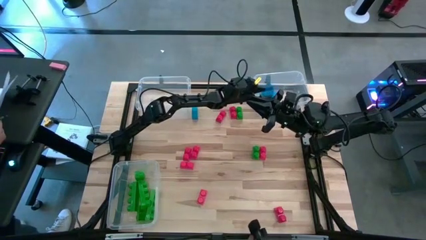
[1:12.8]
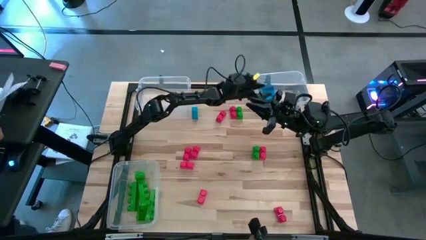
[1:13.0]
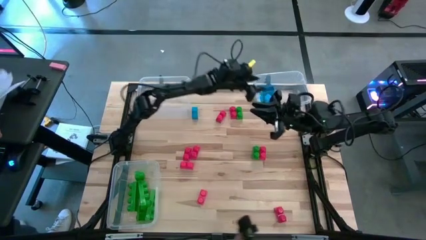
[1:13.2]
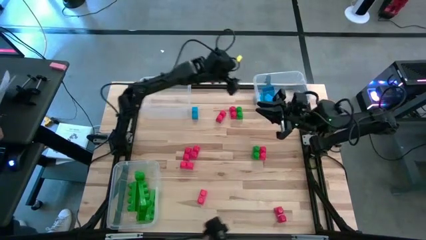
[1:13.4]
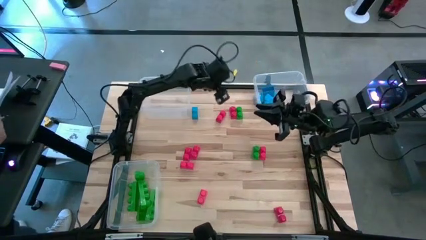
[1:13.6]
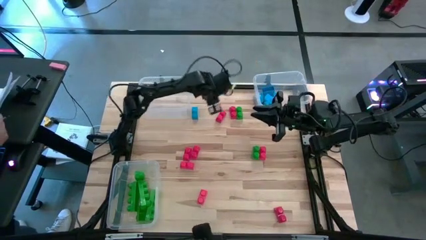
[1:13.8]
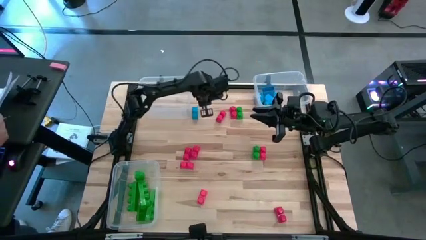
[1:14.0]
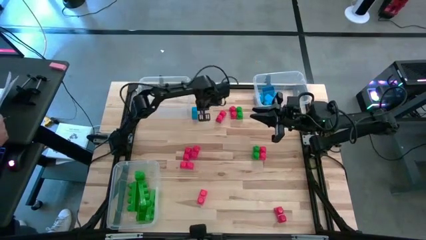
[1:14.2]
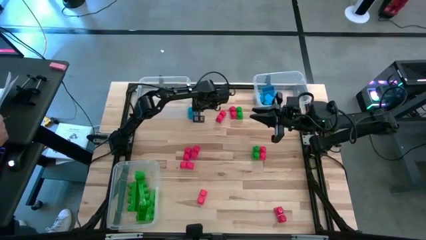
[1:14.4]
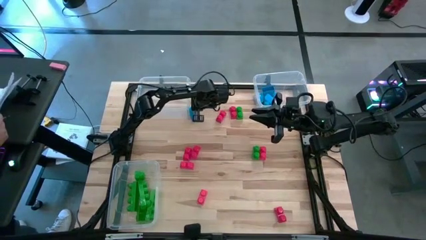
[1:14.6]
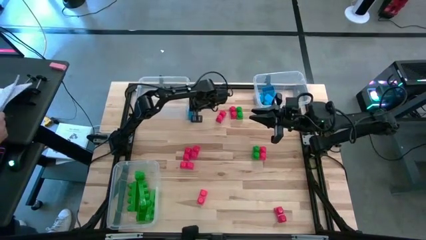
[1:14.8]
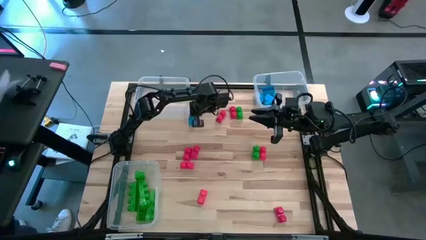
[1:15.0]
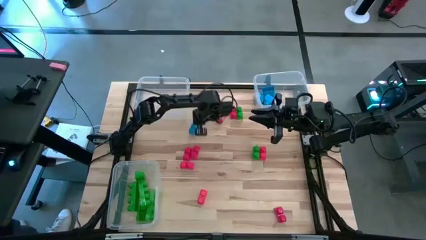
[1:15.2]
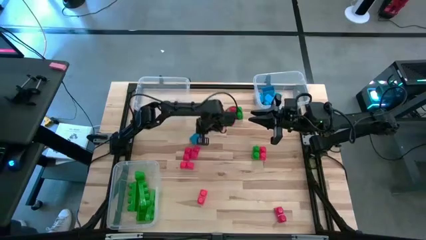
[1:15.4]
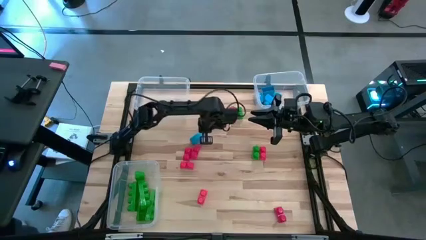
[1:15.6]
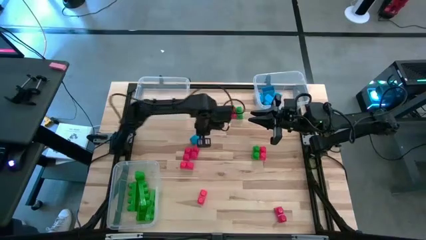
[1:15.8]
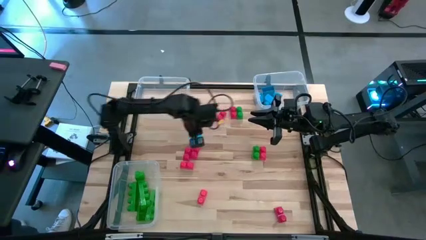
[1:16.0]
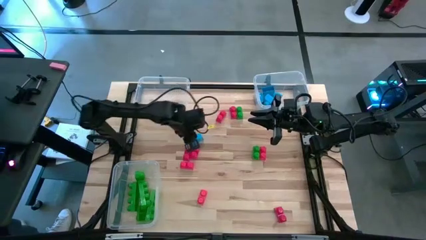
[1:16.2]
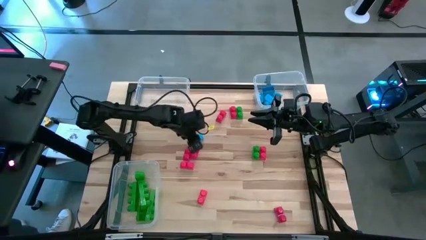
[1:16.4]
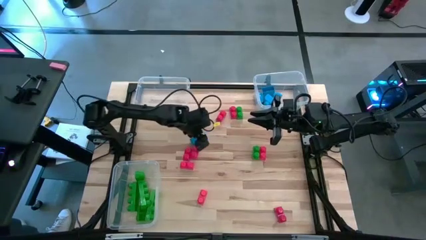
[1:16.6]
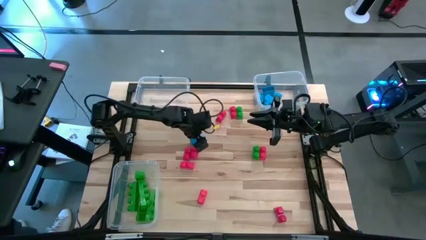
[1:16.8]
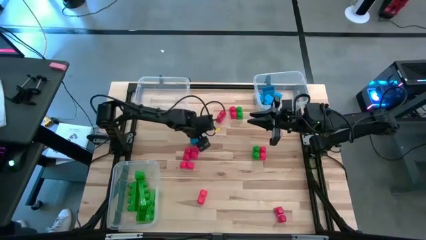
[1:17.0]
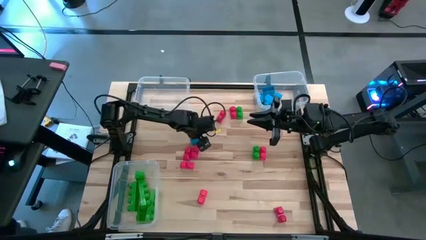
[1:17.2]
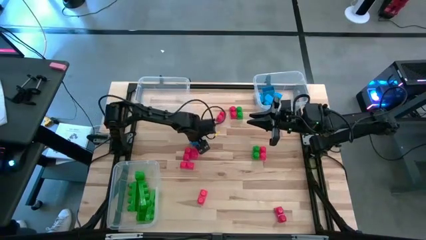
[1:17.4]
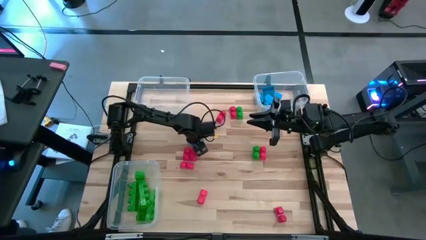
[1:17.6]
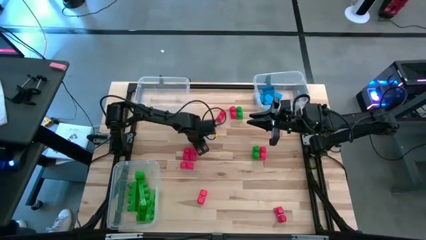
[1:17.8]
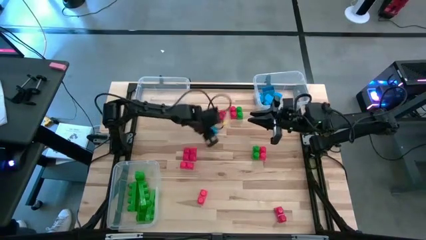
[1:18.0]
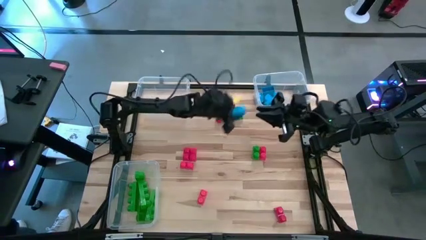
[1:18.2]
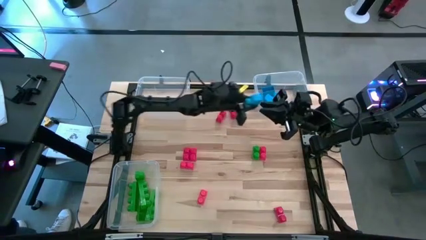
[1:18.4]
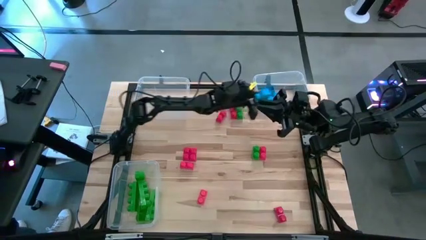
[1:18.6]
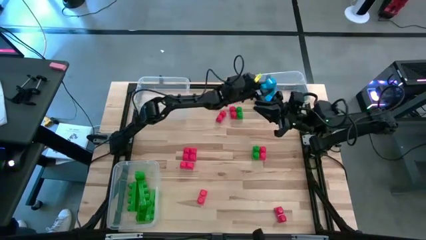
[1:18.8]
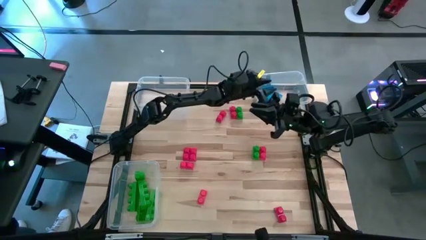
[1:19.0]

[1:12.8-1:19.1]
Task: Sort blocks
Put the blue game piece into the top right transparent bin

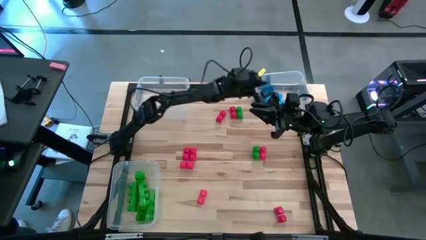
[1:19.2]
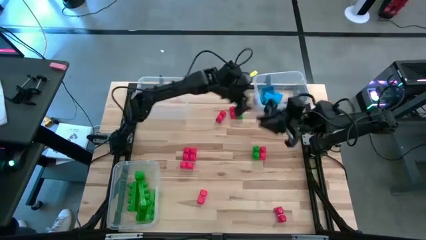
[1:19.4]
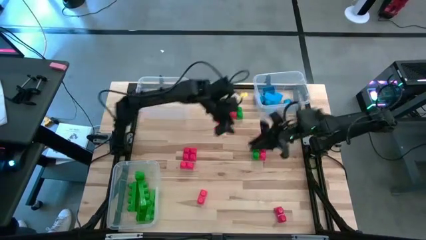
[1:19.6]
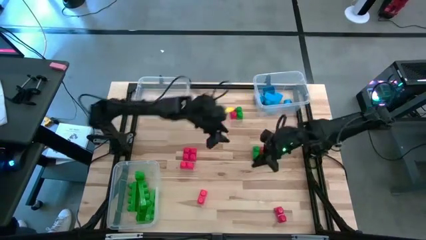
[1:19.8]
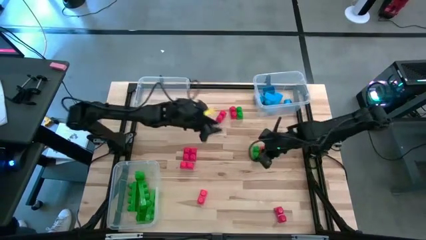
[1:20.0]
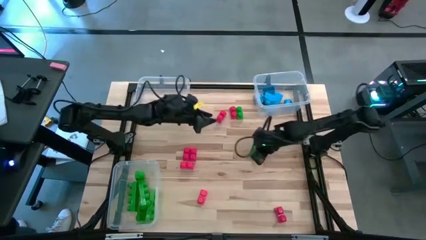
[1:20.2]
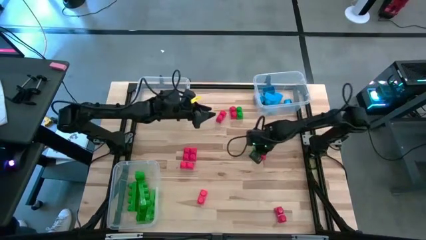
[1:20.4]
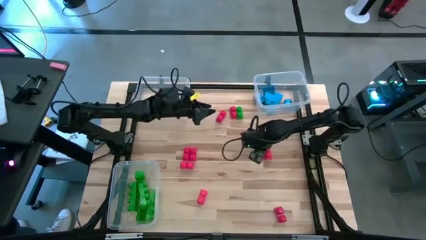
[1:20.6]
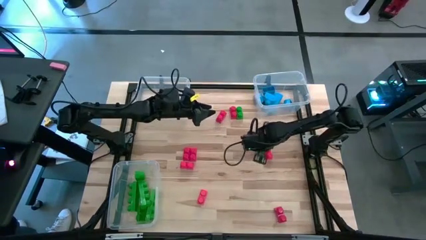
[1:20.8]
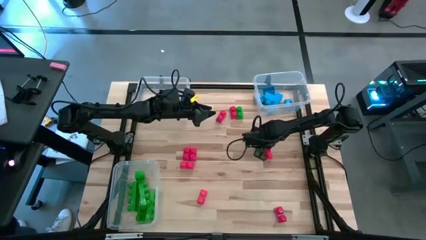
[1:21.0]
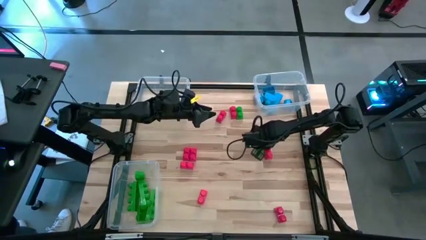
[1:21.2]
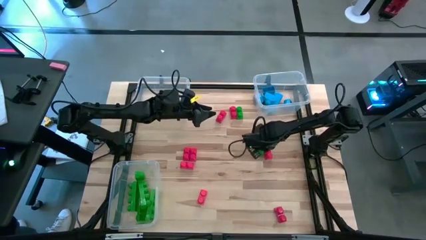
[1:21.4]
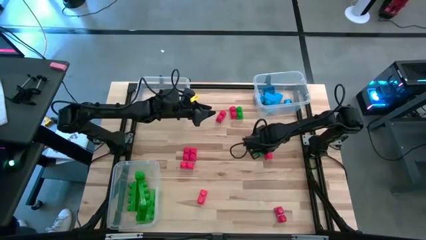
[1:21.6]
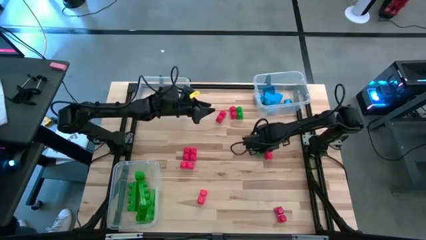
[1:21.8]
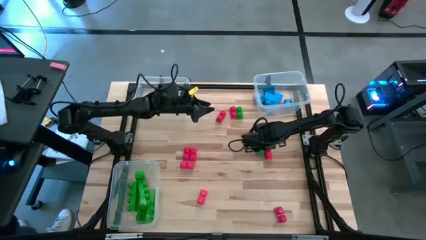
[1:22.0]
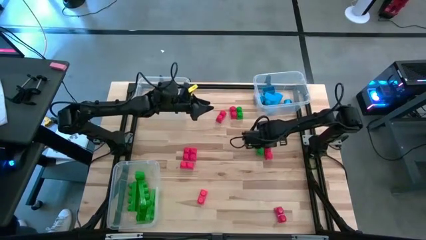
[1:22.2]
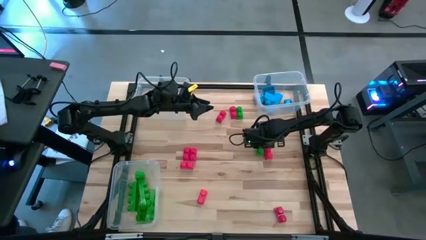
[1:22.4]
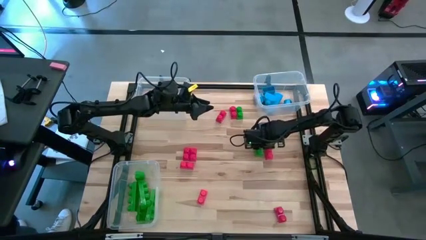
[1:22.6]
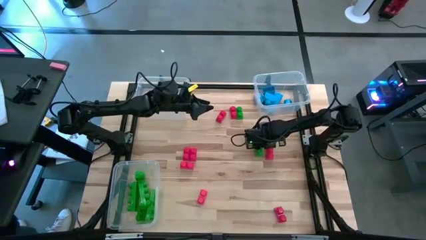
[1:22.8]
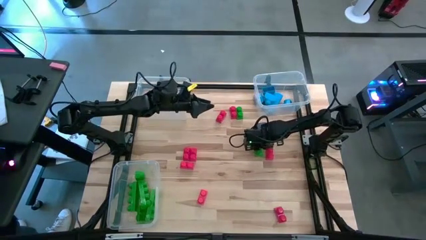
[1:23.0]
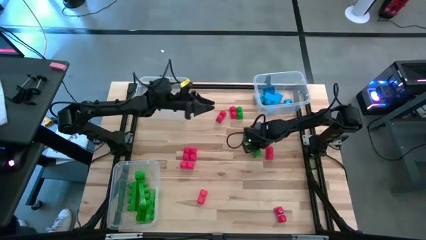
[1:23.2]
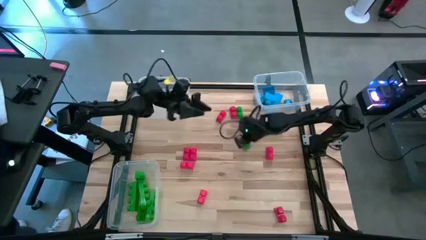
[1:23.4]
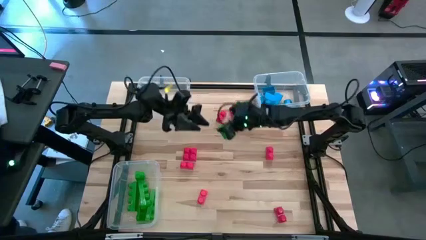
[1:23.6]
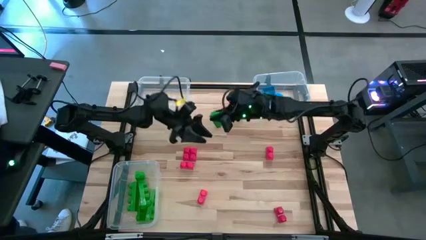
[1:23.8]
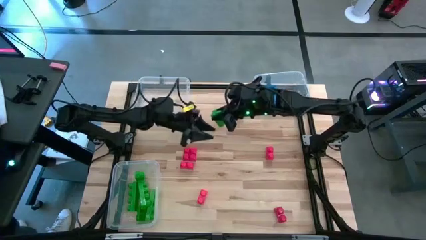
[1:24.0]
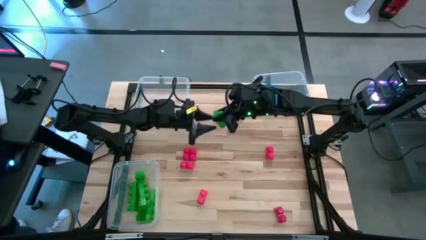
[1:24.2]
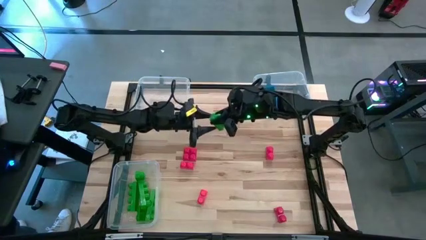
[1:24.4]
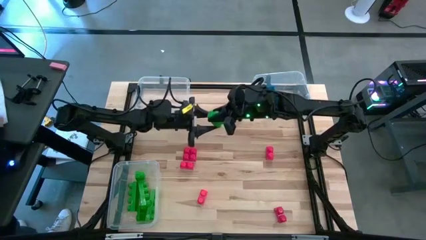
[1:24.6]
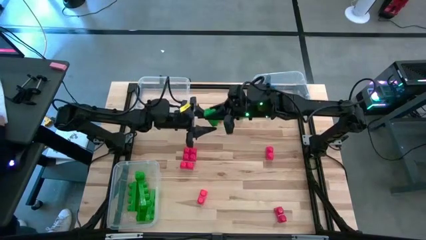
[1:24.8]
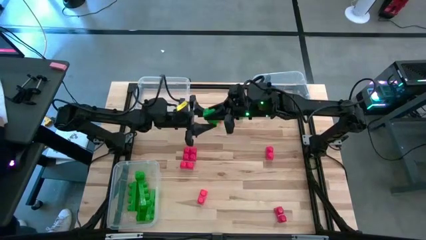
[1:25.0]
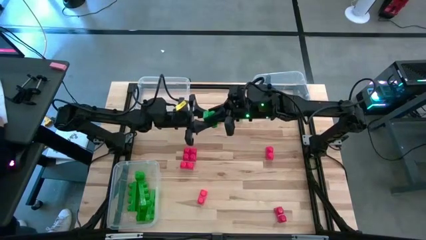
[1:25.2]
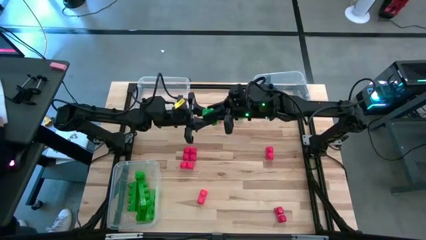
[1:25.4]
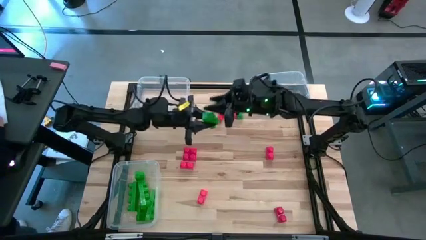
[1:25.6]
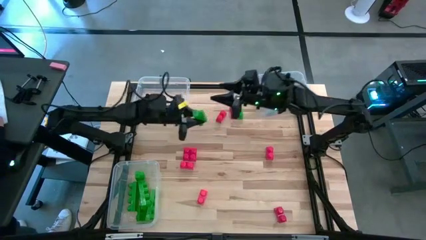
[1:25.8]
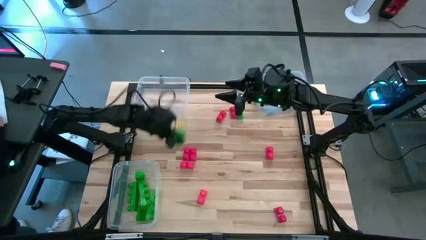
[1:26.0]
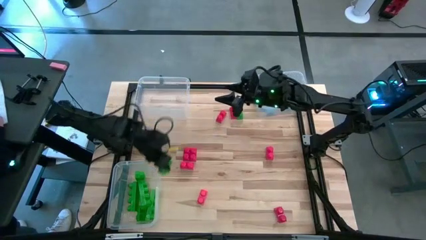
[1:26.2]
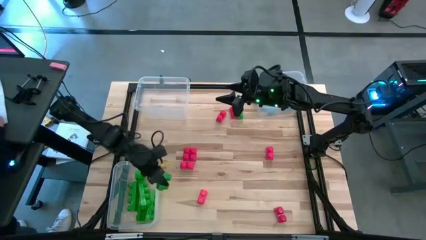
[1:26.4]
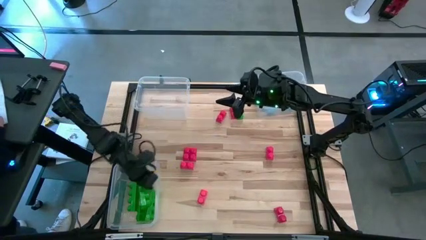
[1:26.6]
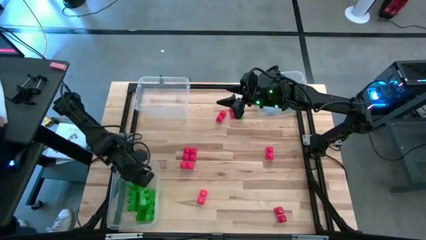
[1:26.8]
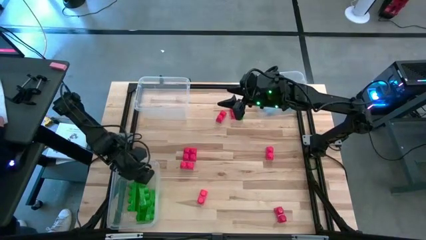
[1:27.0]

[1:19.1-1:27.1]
Put the green game piece into the bottom left transparent bin
